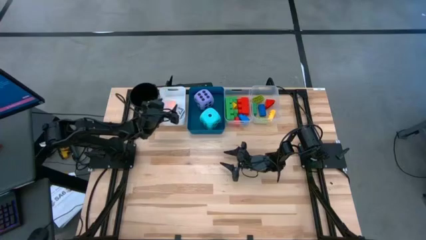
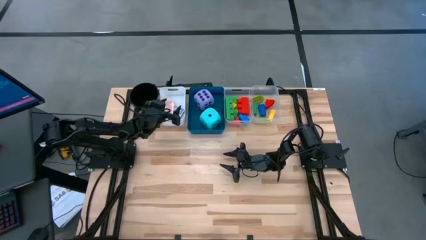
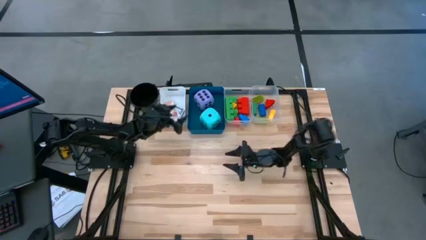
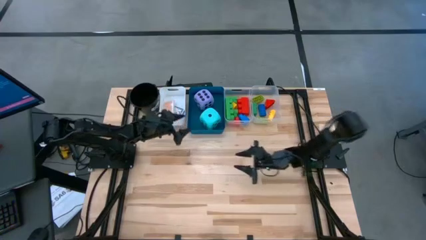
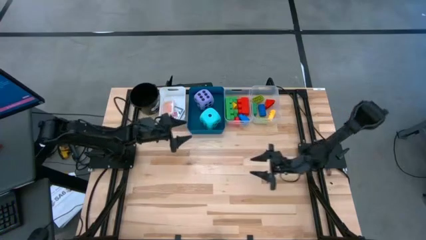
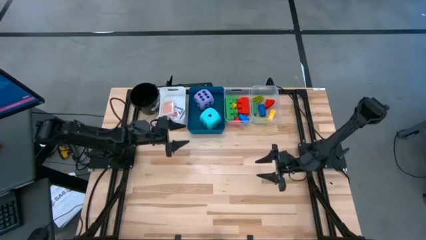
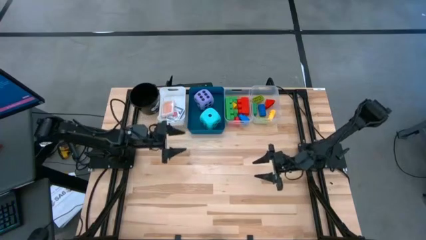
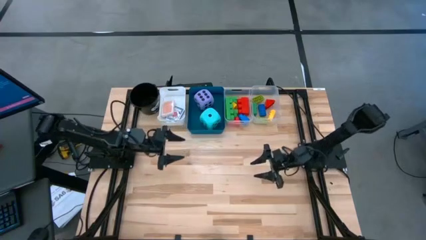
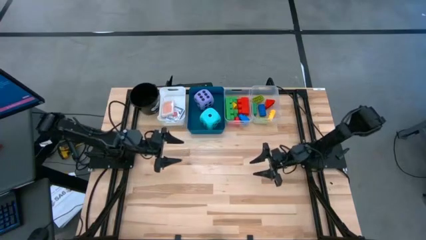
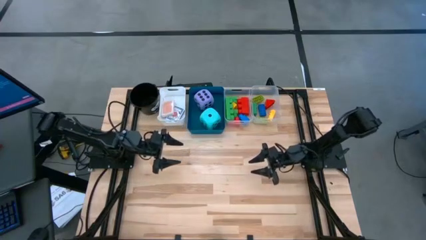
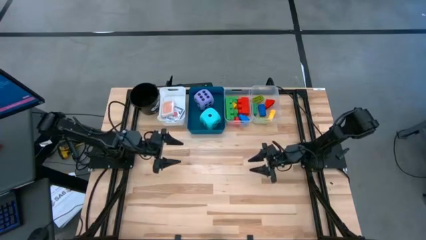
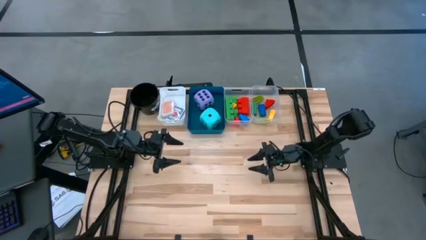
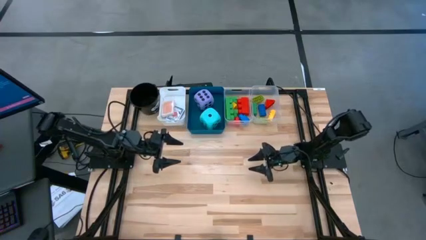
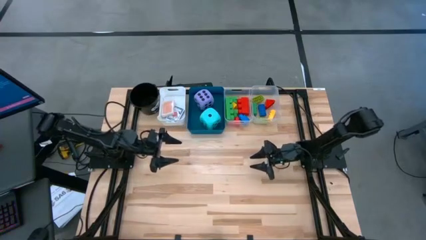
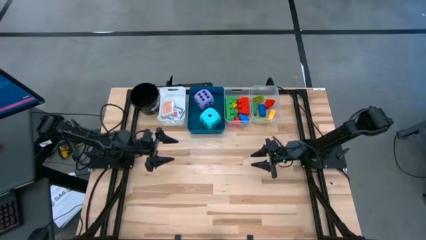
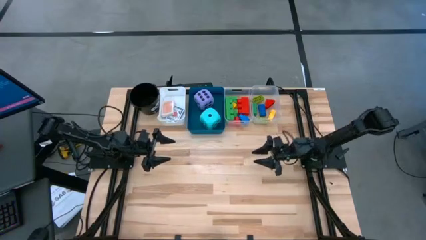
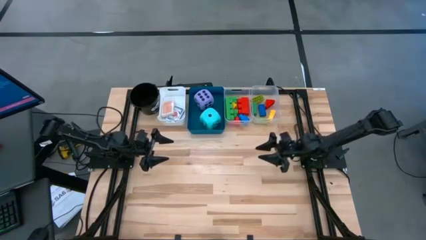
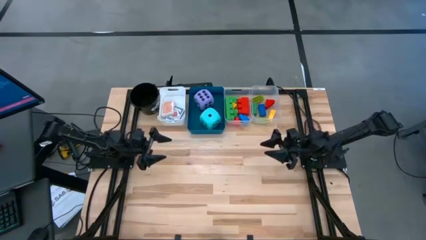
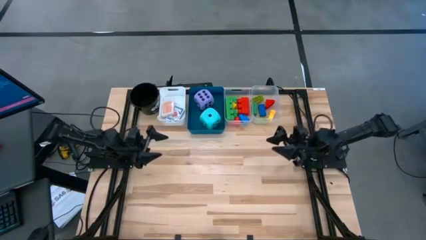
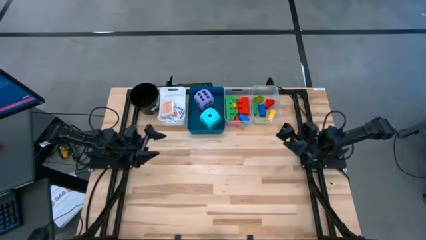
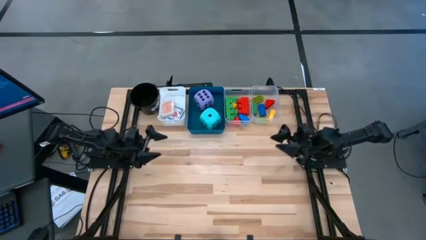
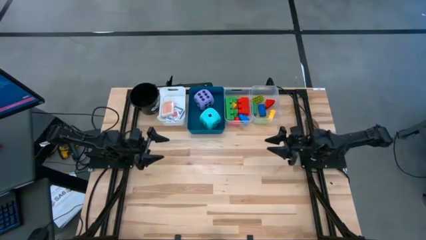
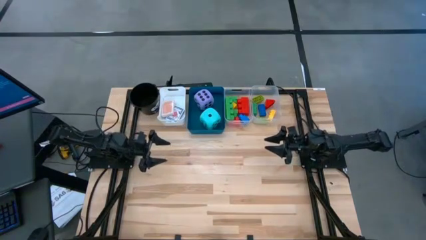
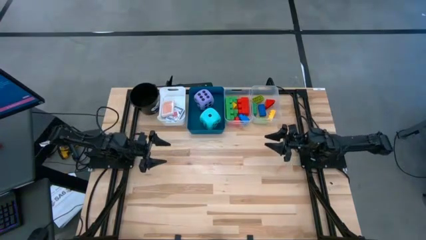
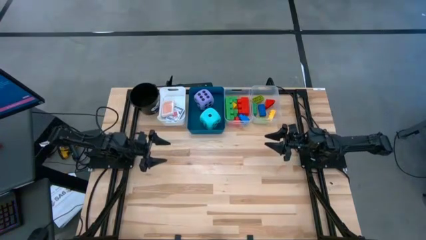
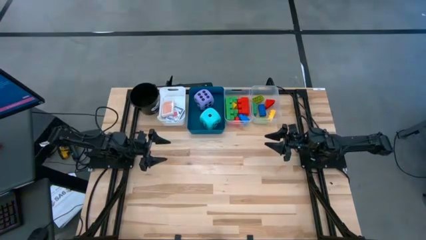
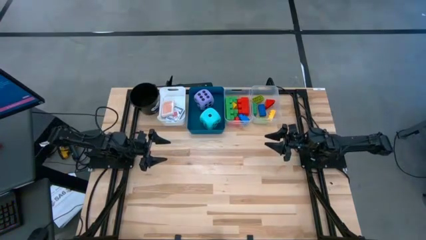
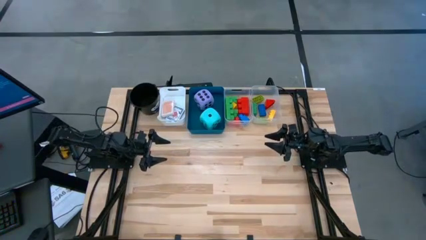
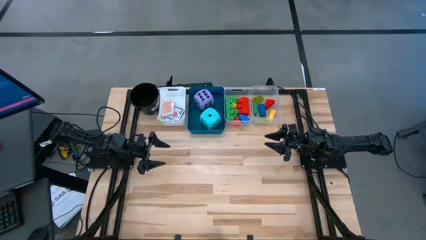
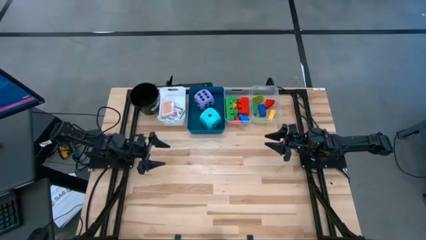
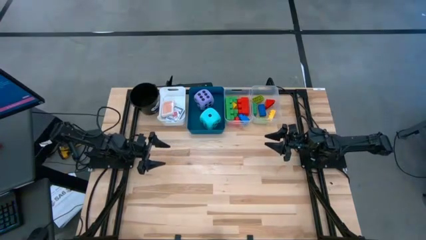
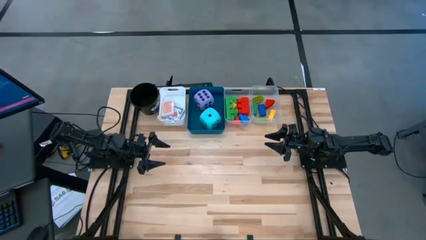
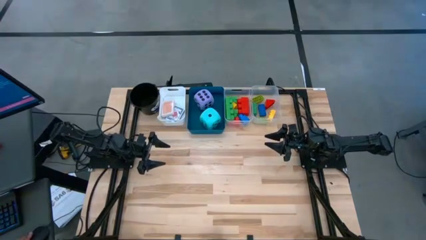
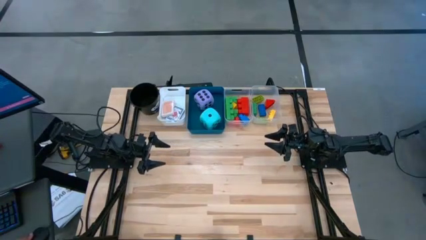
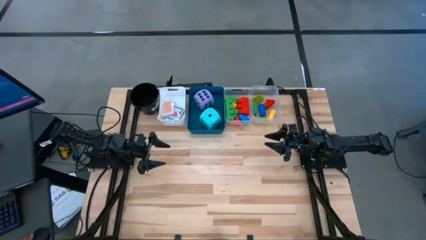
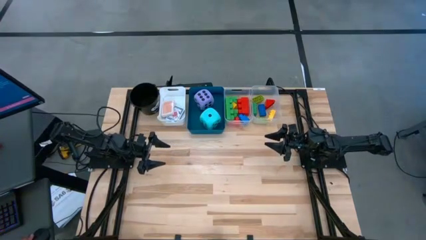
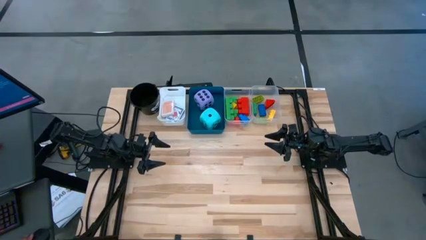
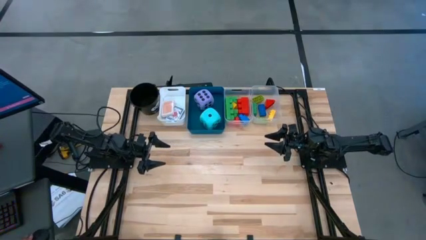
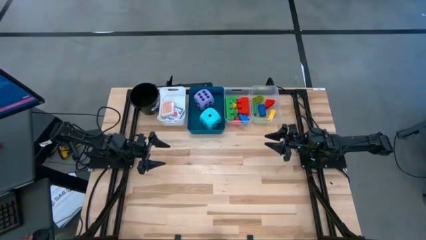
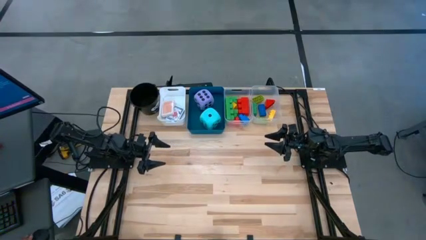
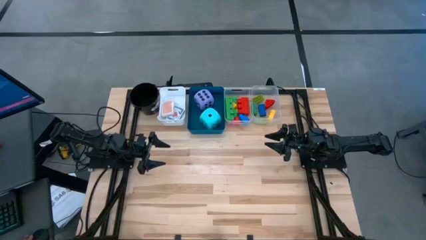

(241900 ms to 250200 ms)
Task: Pick & Place Toys
Return to Home Position

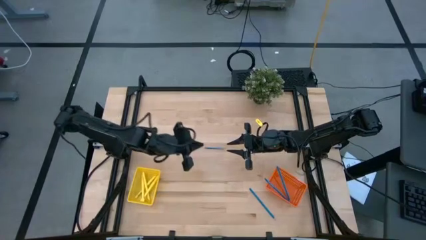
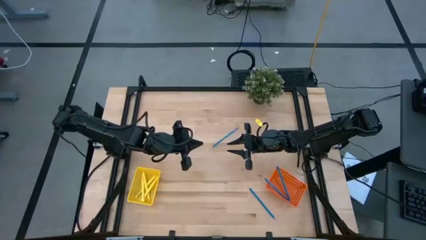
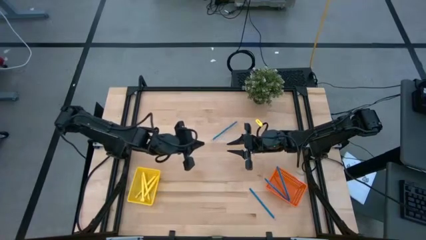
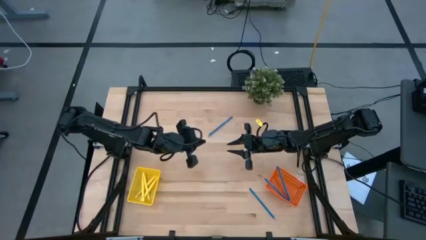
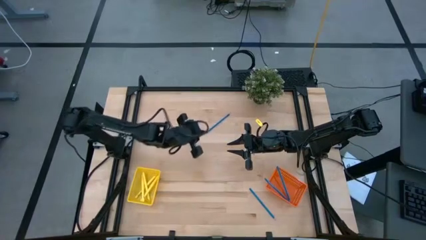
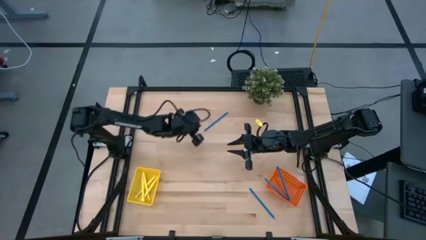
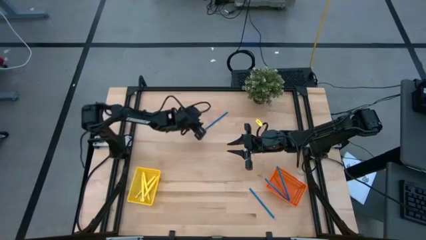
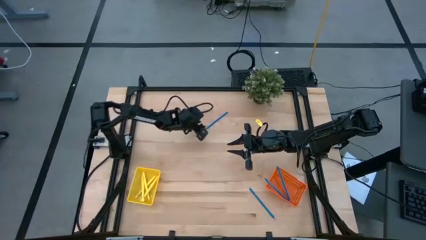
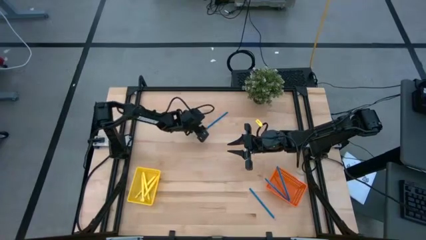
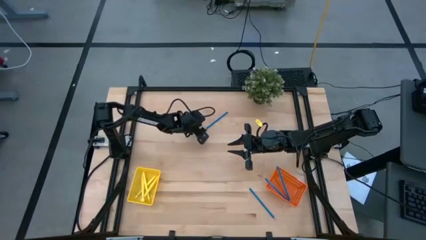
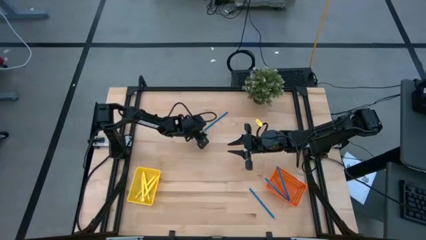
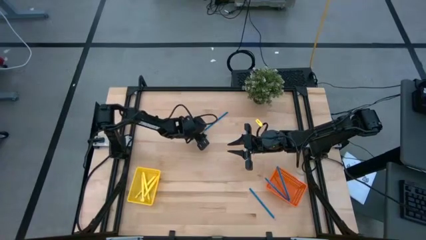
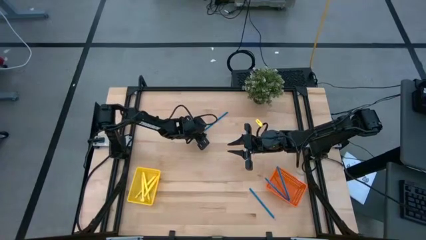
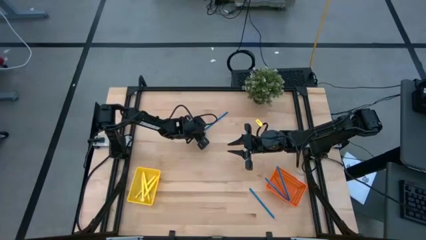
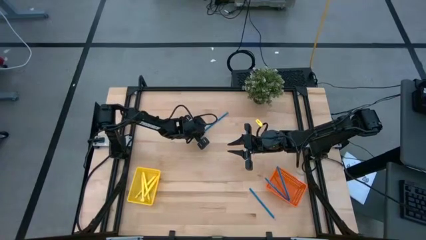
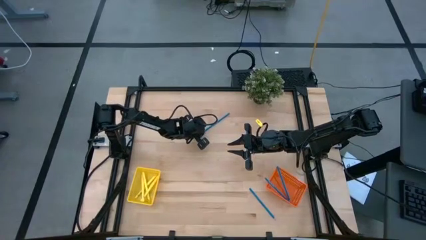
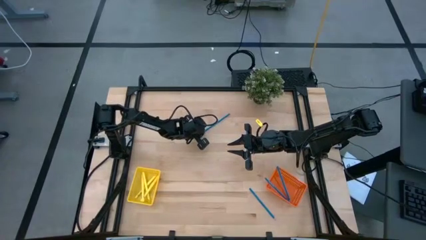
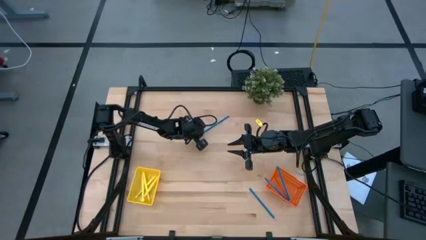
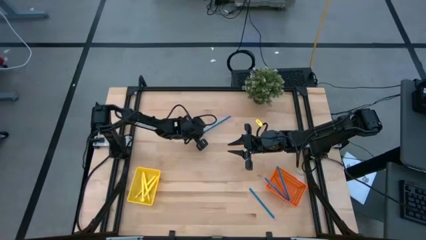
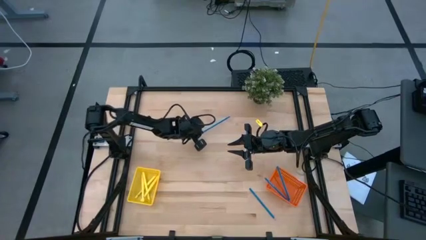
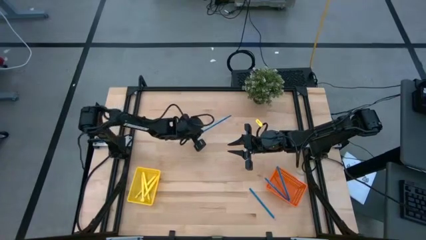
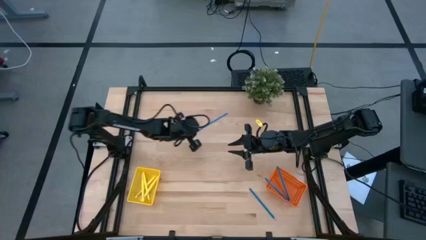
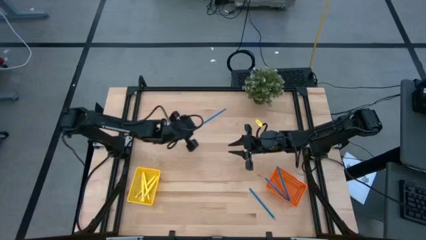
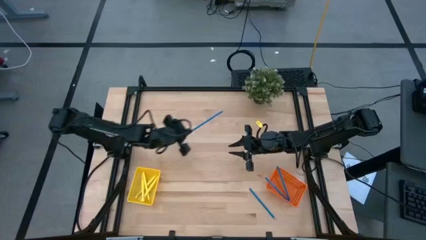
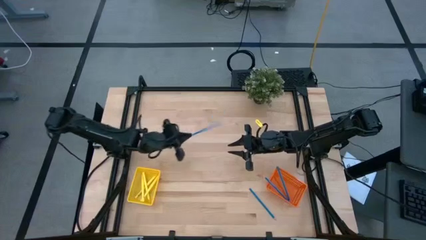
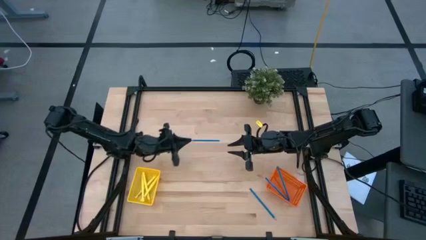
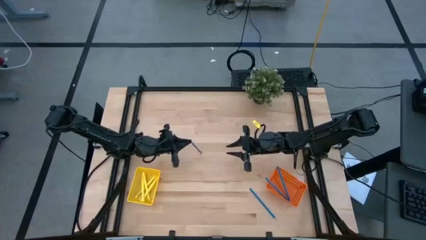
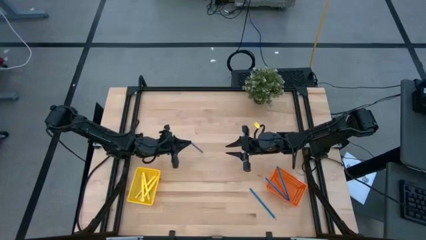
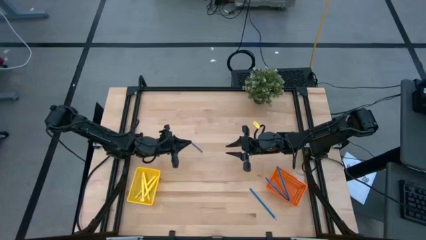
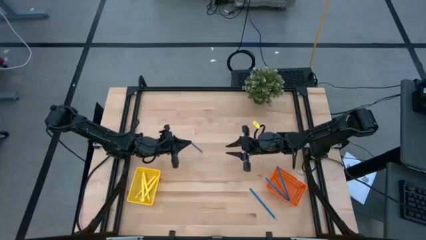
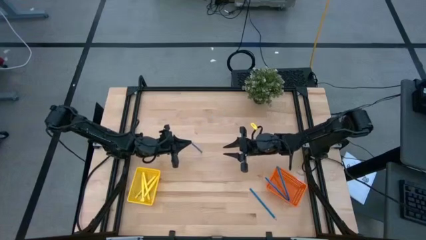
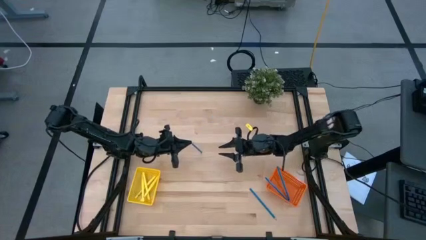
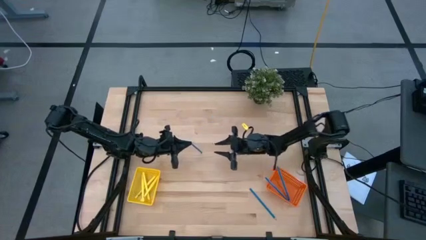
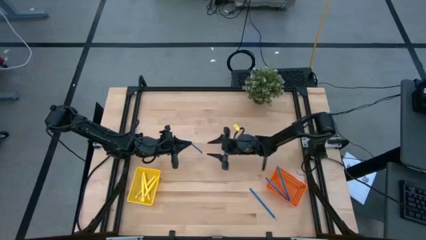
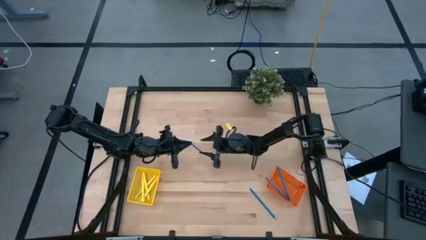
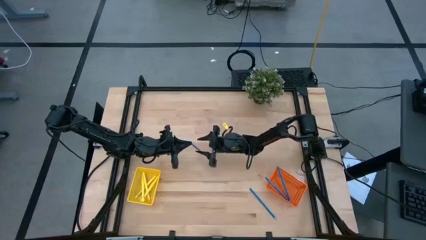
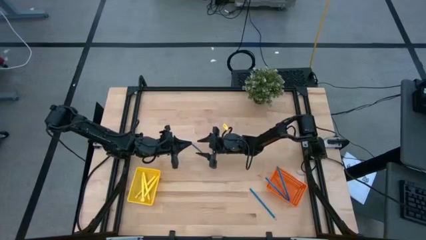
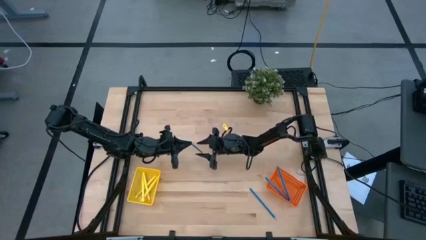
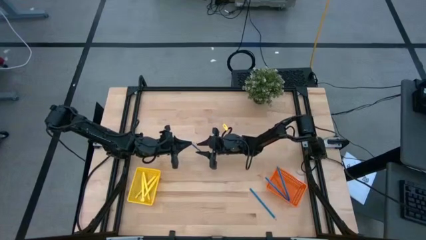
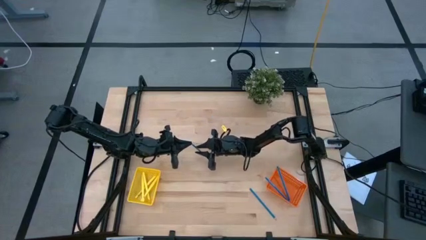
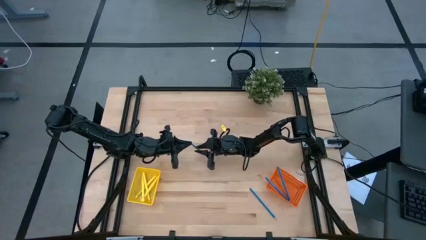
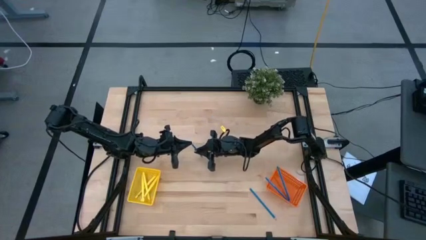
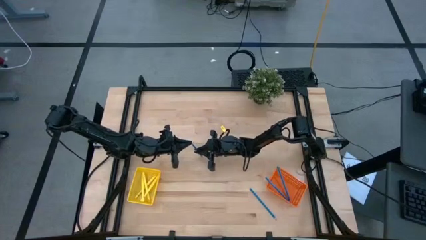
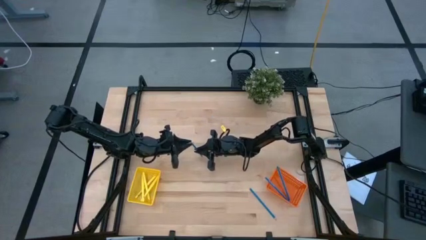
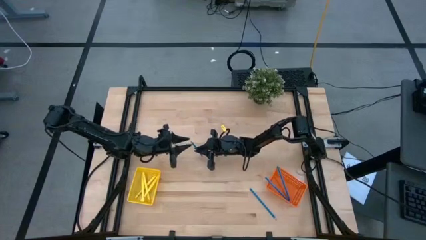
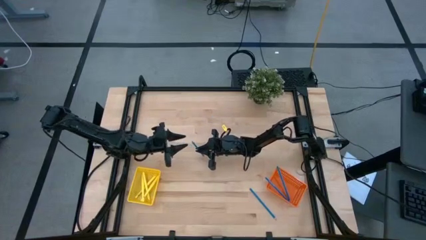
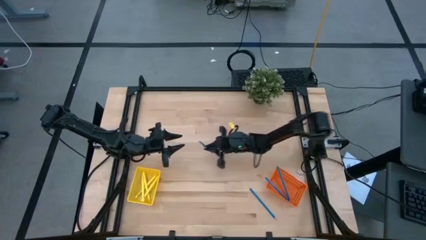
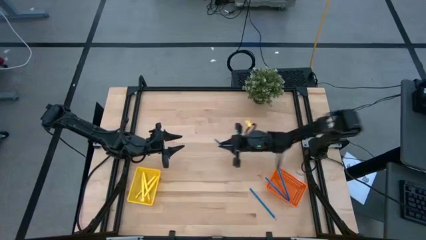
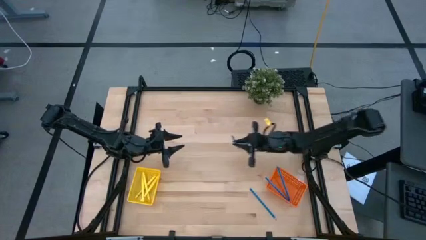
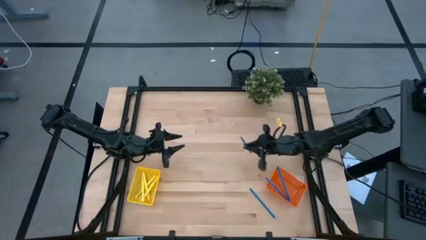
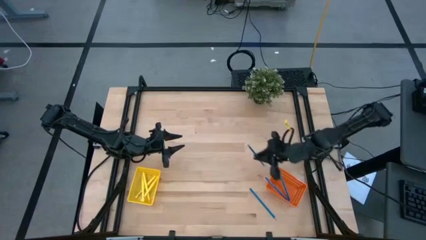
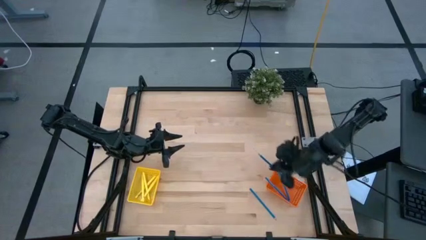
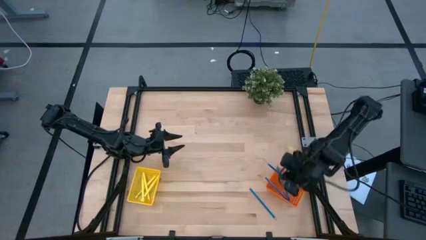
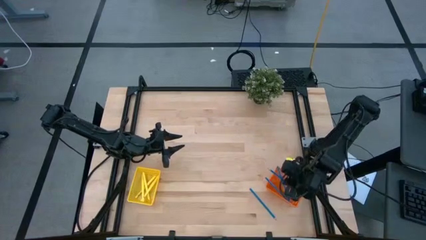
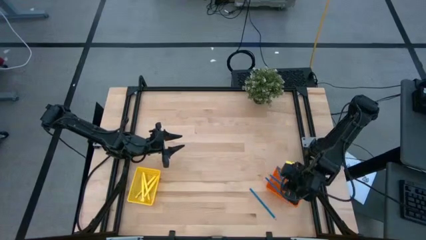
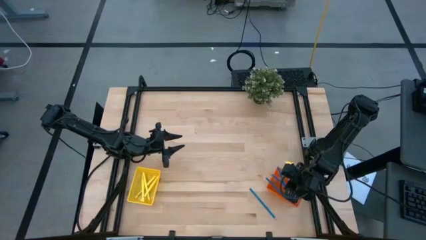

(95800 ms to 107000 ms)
Task: Sort pens & pencils
Put the top blue pencil into the orange bin
